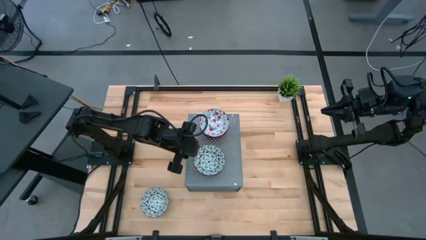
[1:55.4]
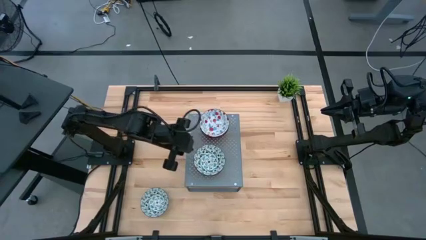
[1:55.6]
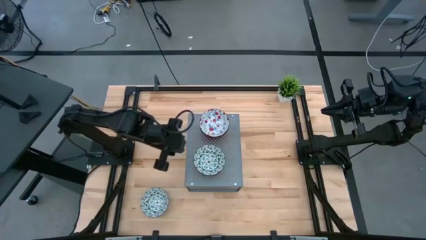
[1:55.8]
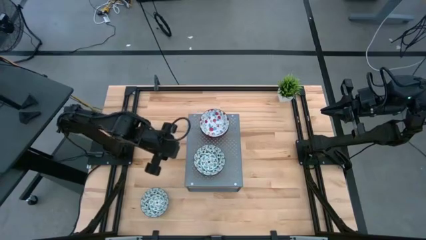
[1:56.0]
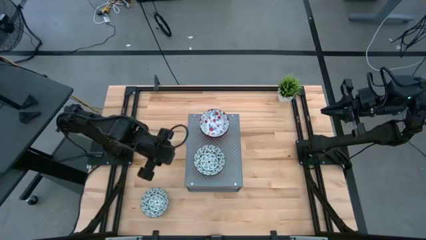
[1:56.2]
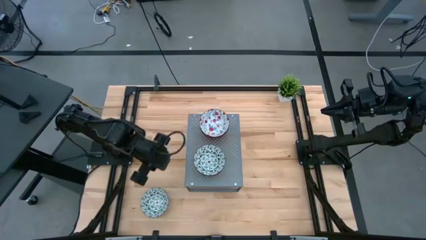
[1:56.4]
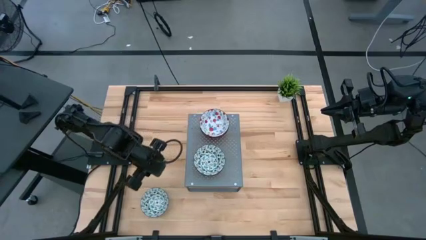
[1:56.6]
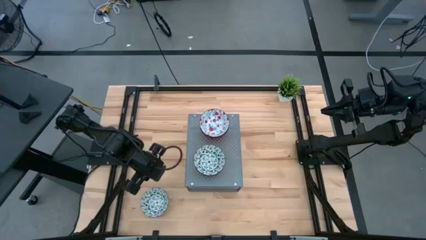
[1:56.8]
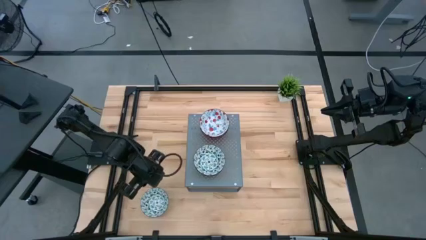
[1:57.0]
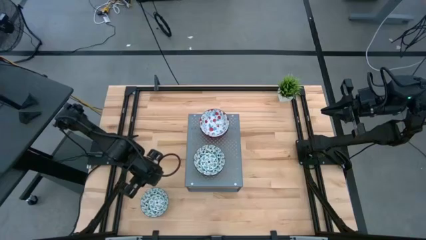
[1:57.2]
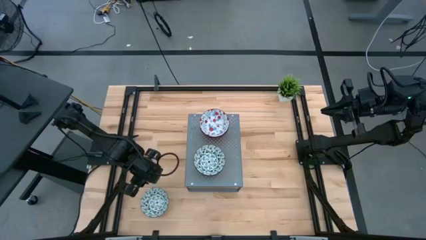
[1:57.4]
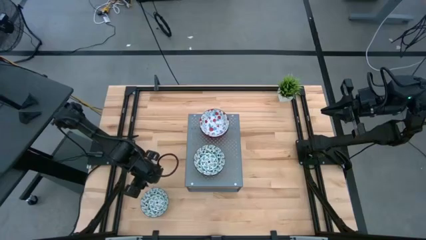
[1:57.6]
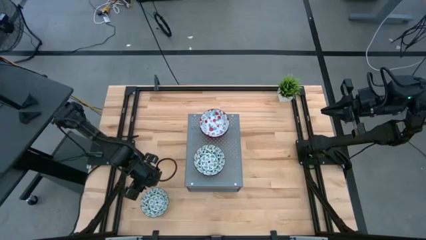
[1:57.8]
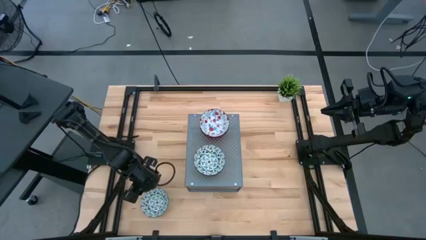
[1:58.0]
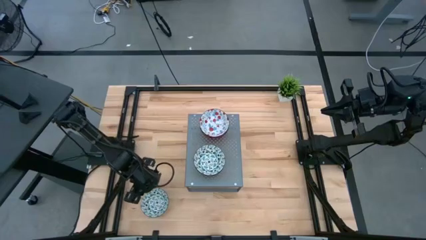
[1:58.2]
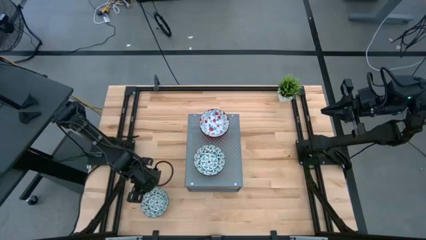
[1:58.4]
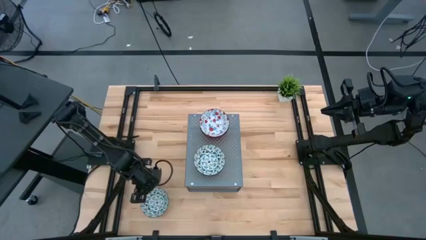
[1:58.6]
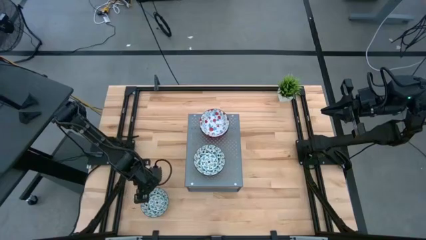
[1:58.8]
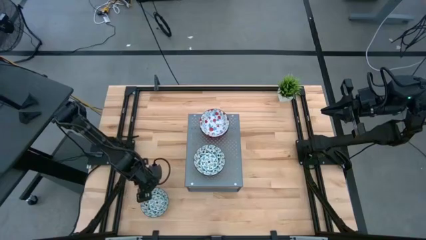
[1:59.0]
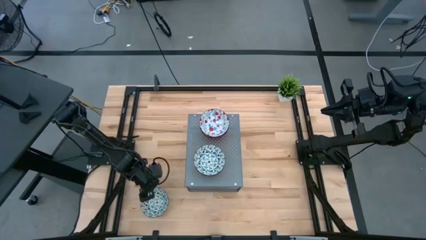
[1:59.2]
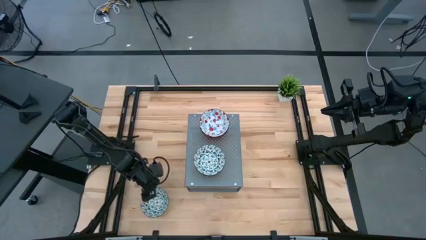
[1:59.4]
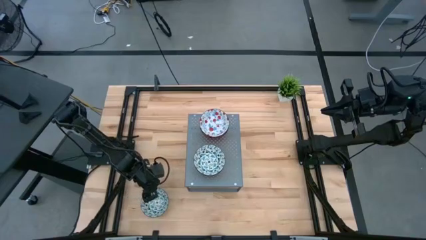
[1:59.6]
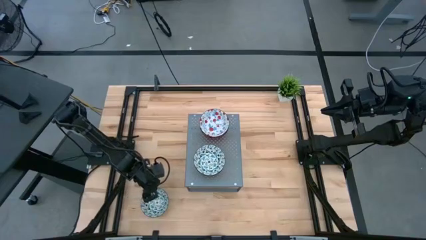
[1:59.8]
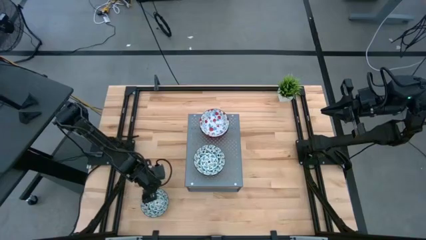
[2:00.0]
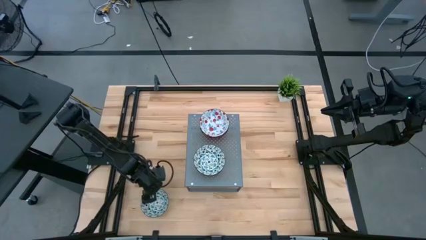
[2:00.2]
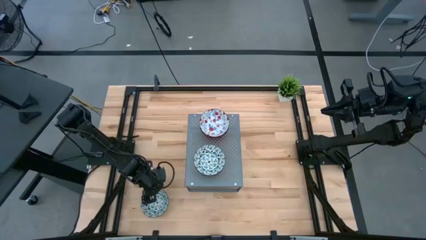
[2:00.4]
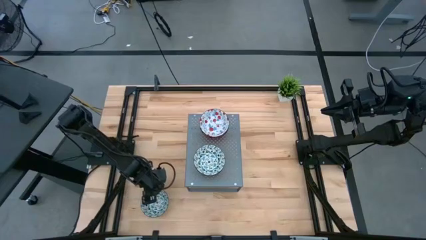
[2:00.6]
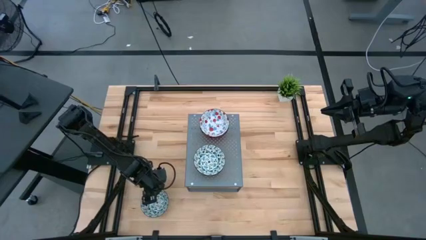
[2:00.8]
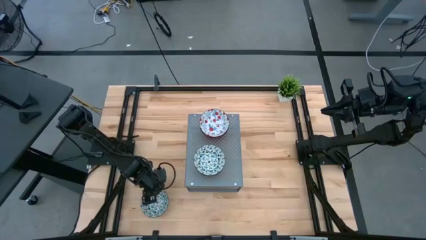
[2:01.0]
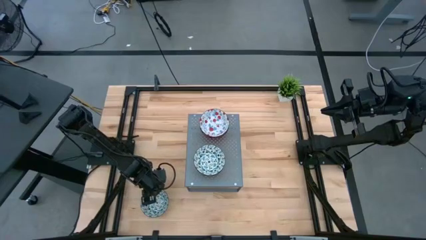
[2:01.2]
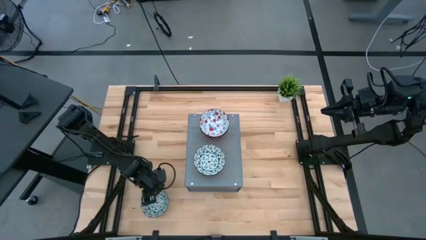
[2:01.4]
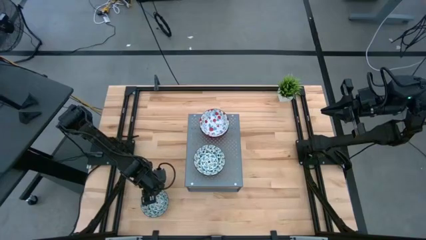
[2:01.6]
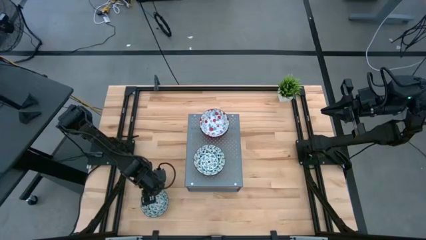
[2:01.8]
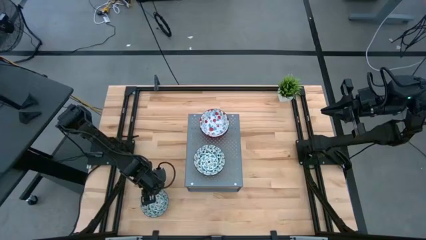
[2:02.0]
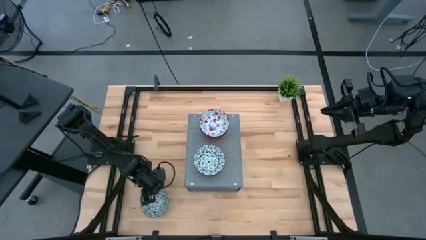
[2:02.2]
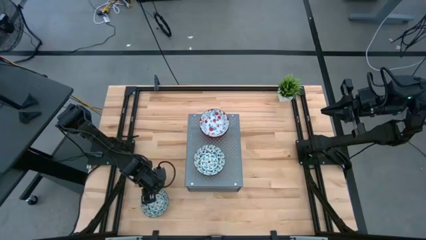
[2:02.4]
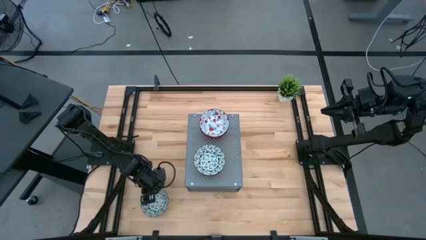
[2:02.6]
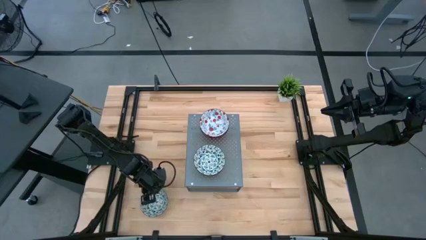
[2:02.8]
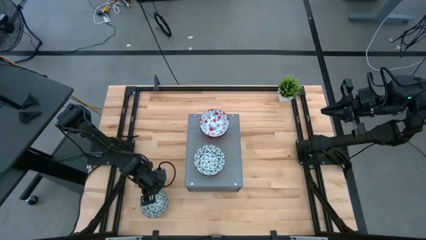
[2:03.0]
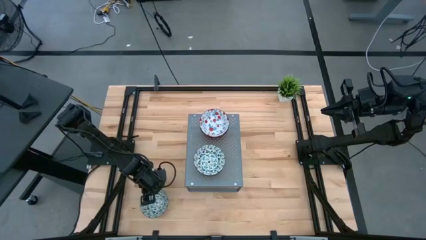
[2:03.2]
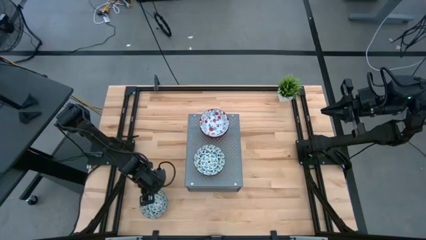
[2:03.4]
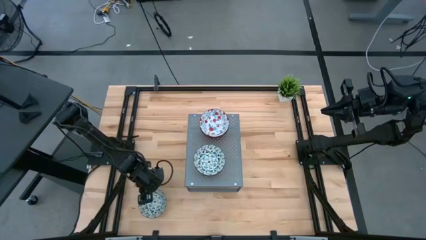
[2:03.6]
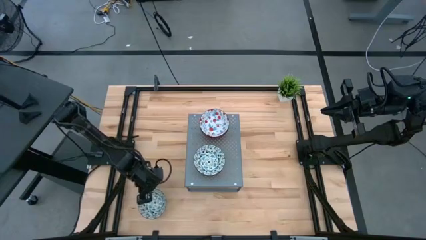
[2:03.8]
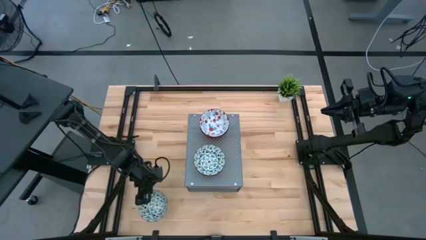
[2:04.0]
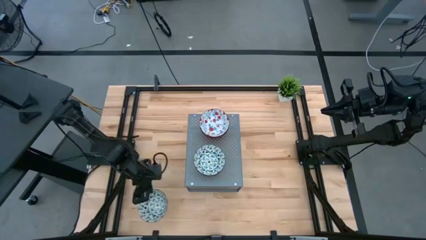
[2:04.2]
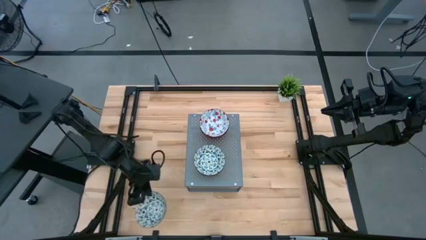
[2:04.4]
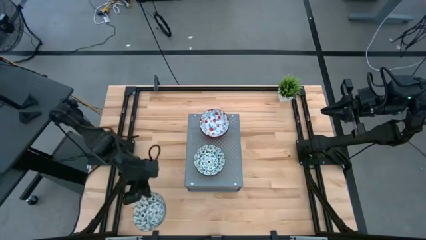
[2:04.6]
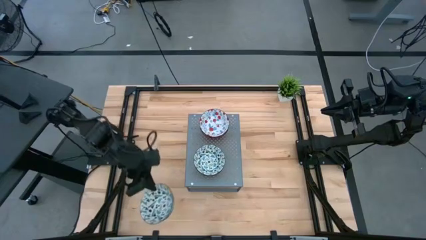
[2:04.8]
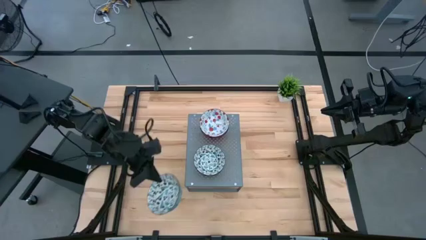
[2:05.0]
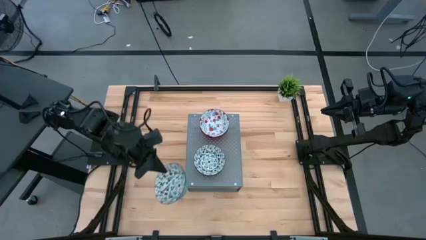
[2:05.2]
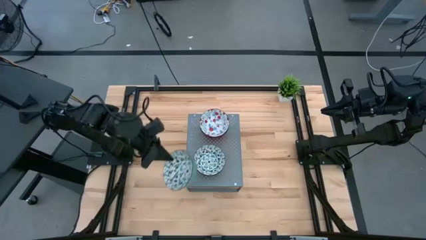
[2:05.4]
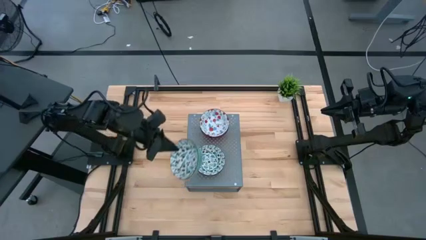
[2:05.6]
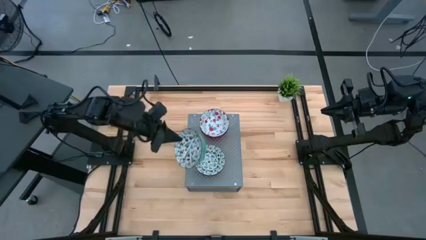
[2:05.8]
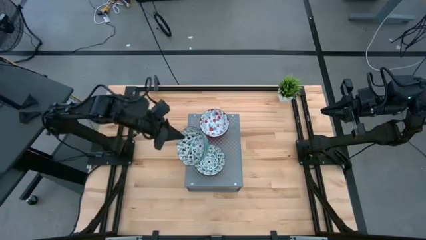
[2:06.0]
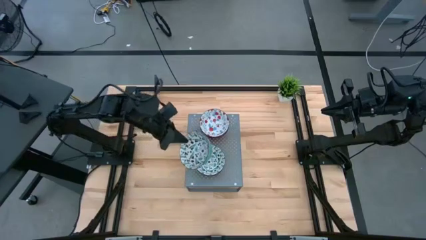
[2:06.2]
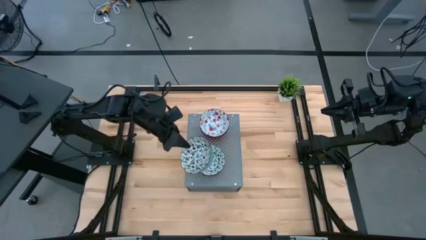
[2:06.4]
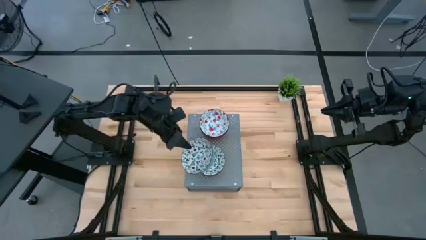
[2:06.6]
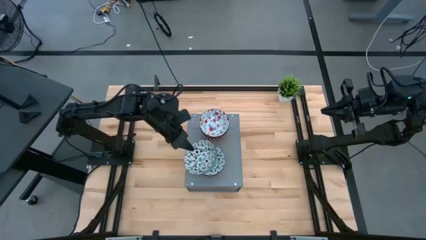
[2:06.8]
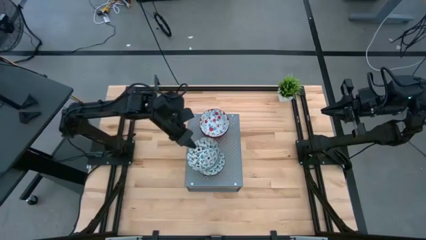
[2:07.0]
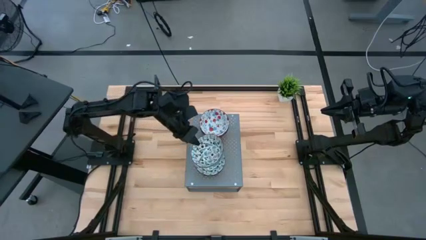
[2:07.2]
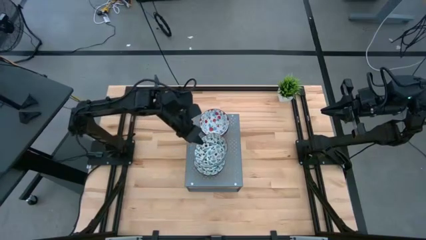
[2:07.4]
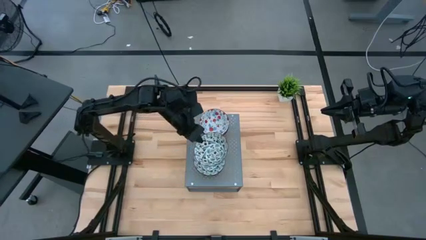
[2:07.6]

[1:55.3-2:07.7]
Task: Pick & Place Mini bowls
Put the green bowl on top of the green bowl on the shelf

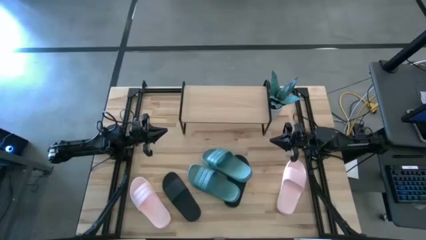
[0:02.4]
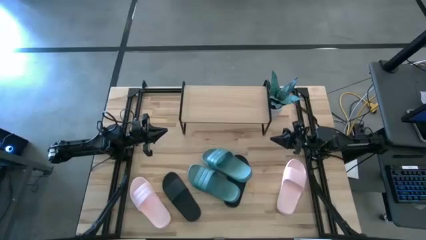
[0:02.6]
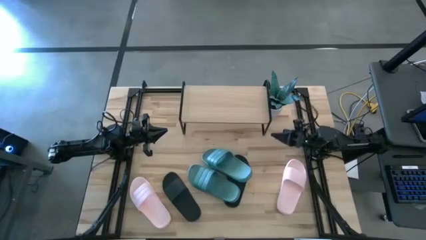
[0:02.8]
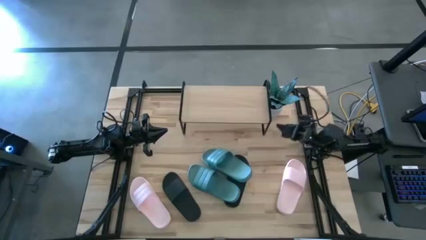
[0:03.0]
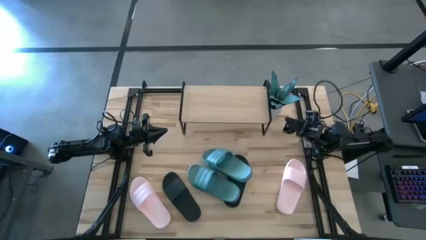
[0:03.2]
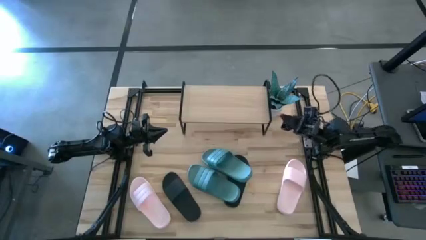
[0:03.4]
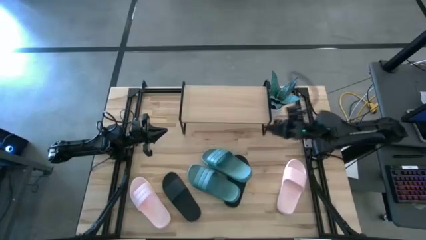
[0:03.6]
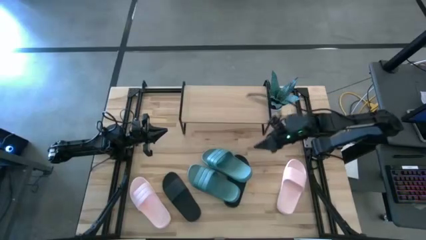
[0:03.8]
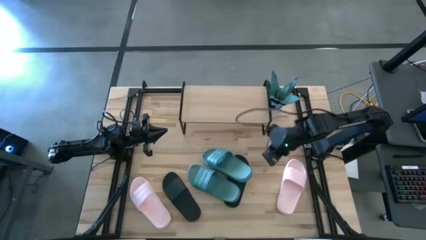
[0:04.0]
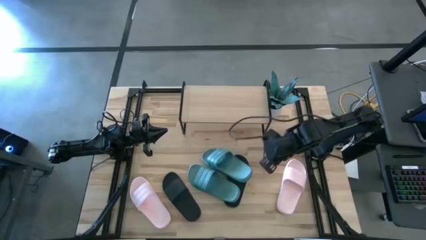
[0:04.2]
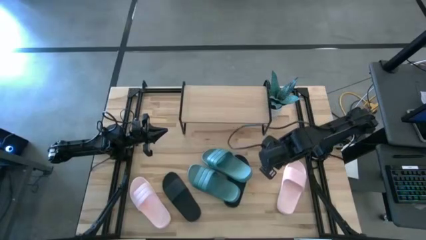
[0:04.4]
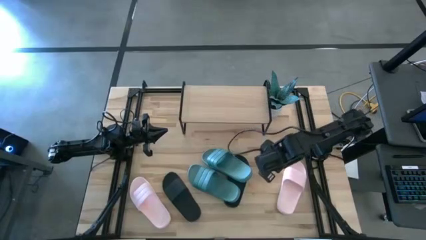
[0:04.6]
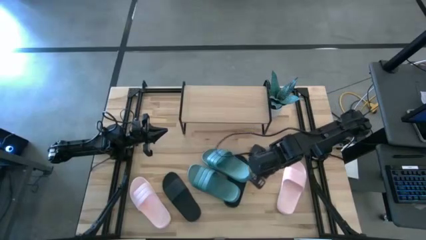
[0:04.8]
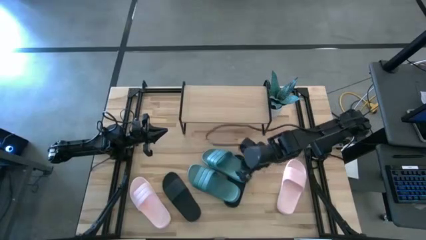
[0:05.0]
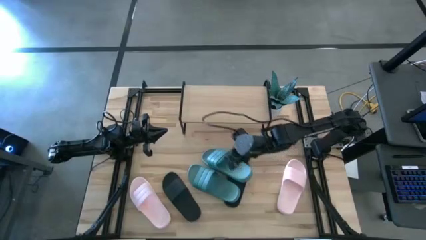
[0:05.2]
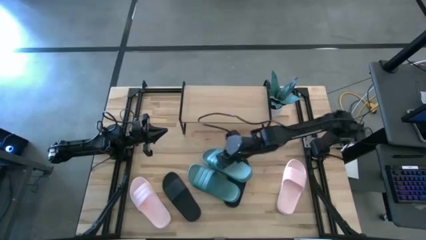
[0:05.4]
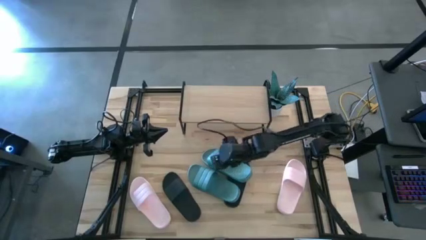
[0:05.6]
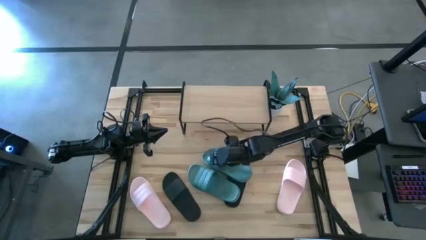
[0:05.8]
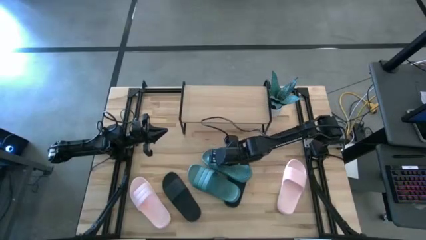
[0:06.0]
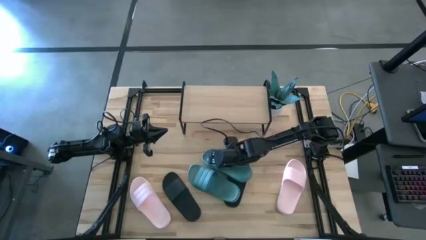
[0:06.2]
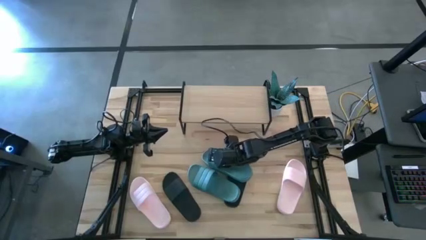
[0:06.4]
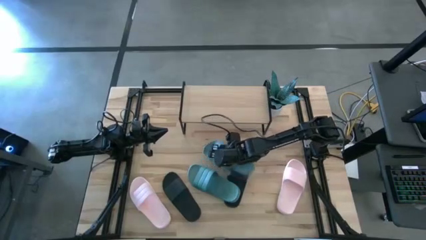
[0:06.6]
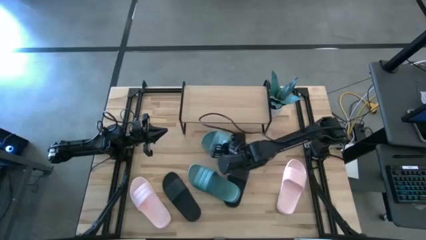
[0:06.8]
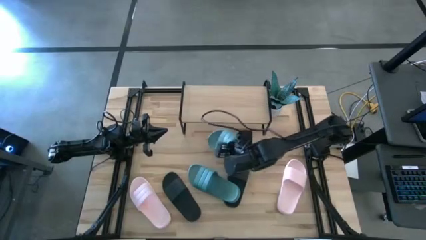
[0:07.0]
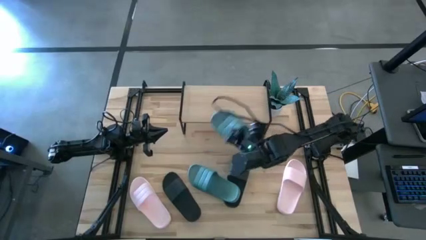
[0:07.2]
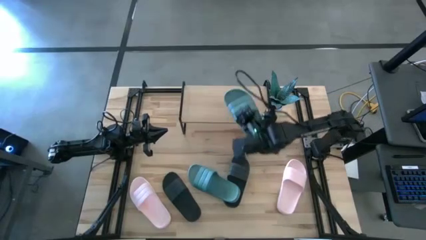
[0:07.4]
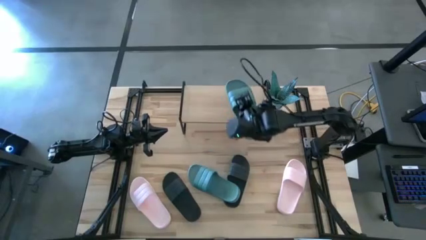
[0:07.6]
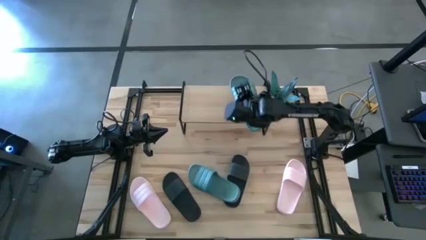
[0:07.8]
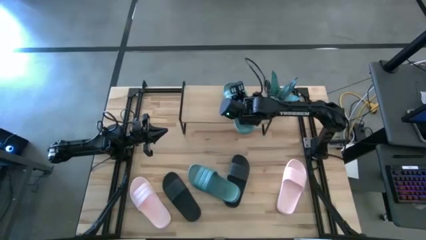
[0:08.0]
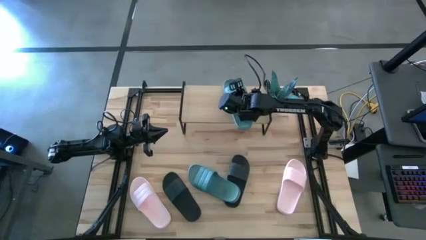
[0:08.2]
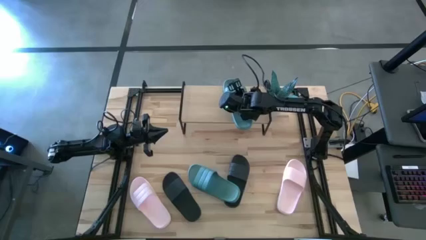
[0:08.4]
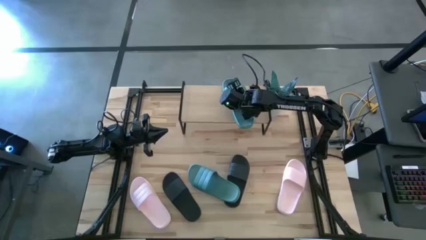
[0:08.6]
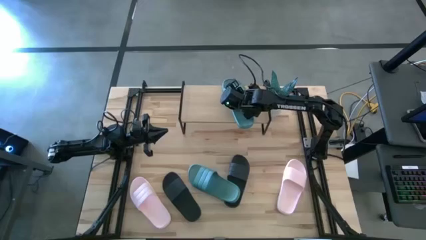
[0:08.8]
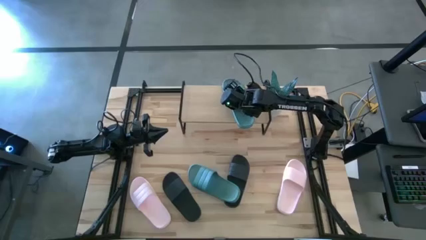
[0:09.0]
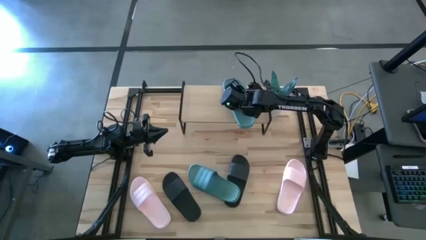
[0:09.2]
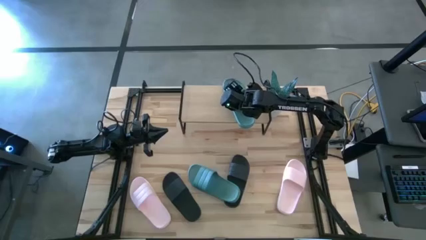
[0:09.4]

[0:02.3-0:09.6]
Task: Pick and place slides into the shelf
Put the top green slipper on the shelf
